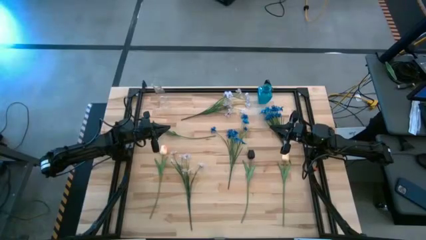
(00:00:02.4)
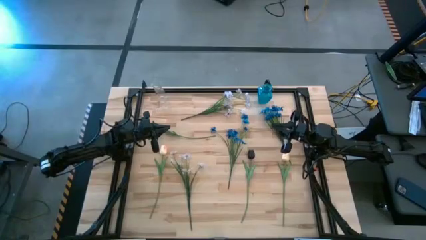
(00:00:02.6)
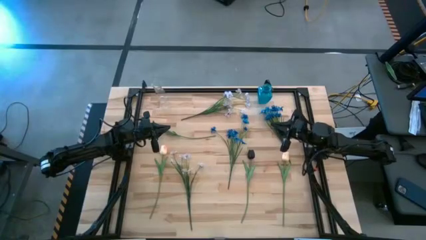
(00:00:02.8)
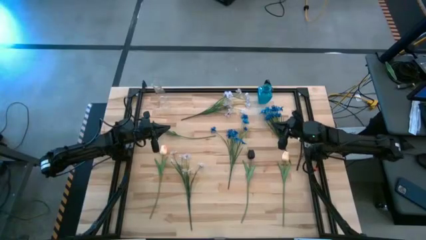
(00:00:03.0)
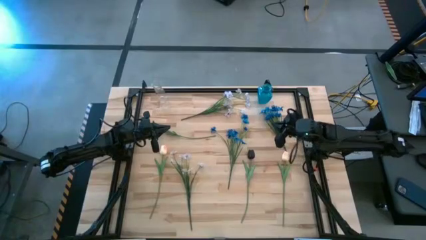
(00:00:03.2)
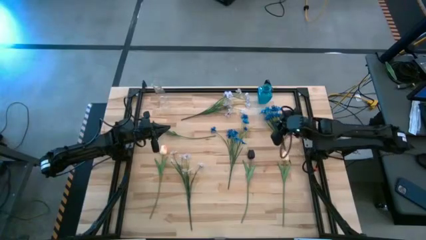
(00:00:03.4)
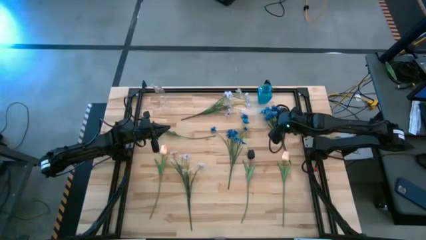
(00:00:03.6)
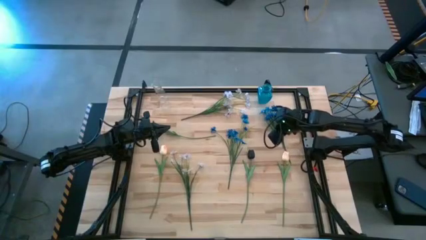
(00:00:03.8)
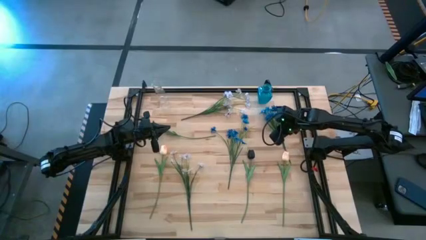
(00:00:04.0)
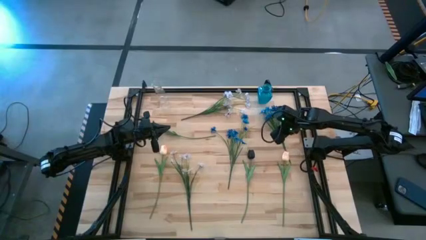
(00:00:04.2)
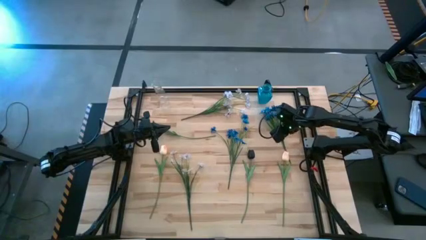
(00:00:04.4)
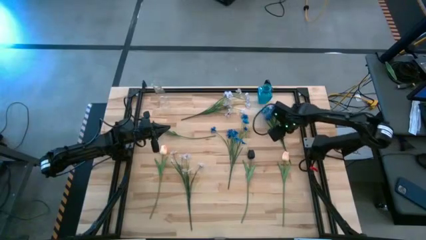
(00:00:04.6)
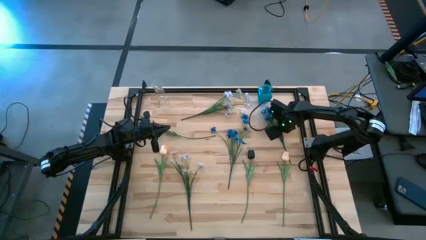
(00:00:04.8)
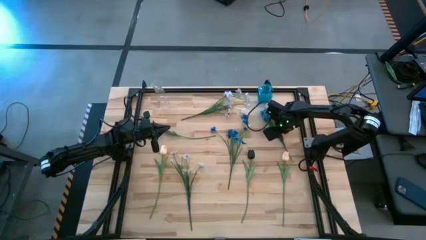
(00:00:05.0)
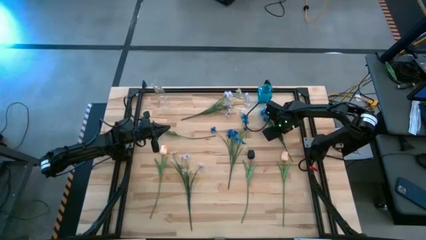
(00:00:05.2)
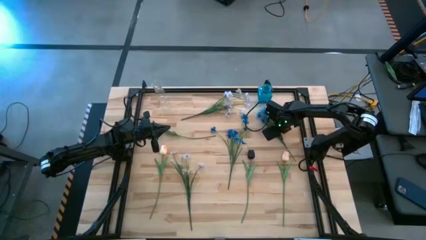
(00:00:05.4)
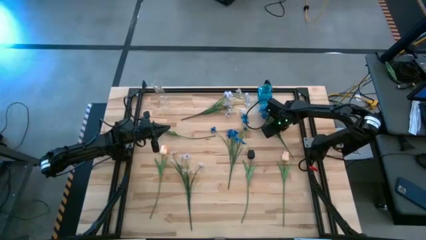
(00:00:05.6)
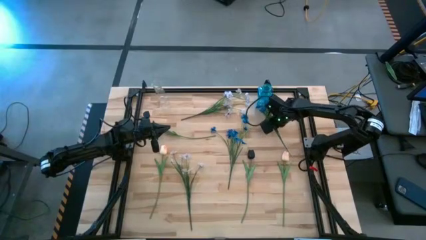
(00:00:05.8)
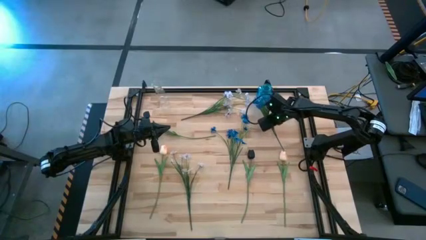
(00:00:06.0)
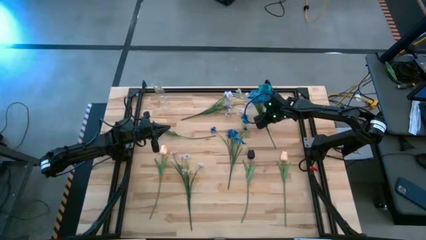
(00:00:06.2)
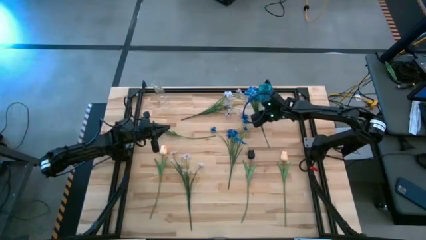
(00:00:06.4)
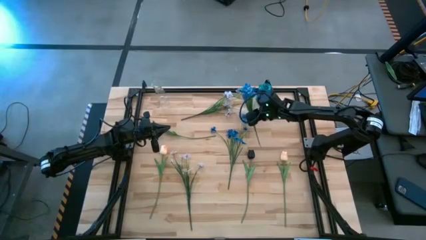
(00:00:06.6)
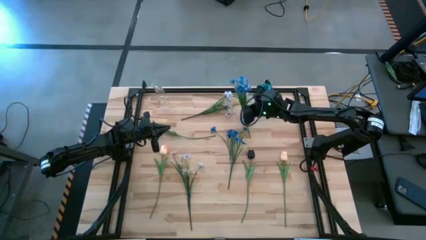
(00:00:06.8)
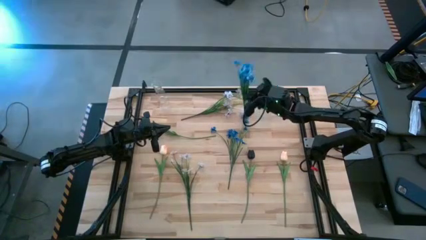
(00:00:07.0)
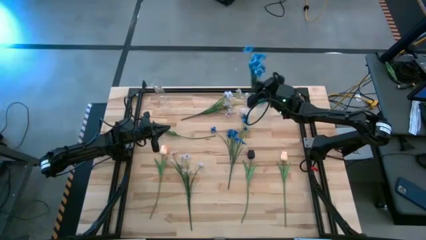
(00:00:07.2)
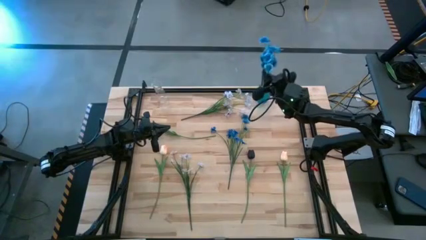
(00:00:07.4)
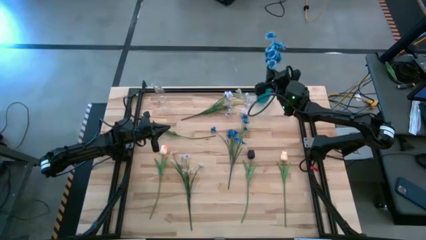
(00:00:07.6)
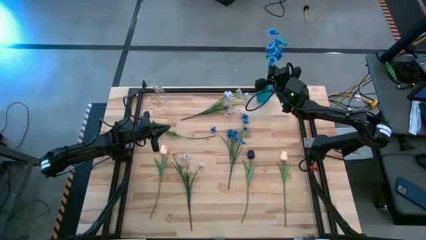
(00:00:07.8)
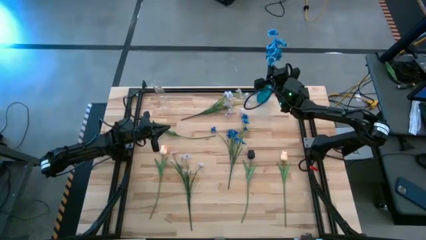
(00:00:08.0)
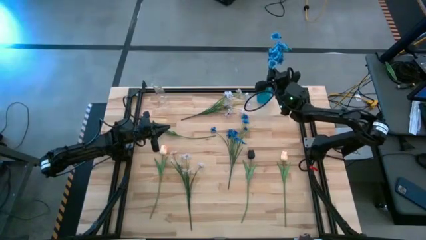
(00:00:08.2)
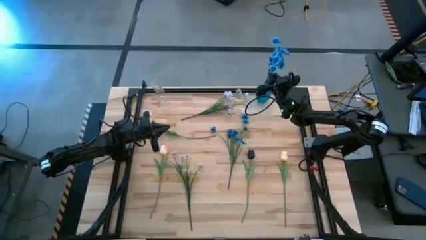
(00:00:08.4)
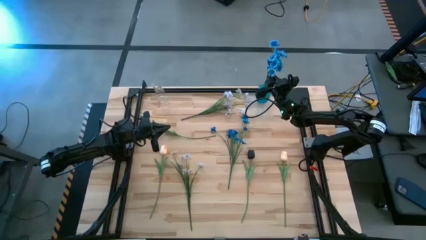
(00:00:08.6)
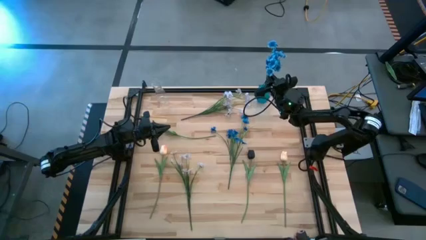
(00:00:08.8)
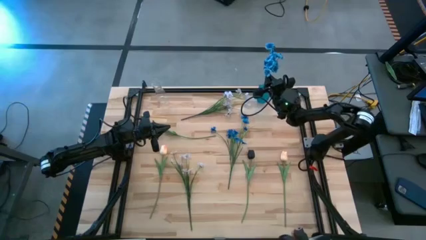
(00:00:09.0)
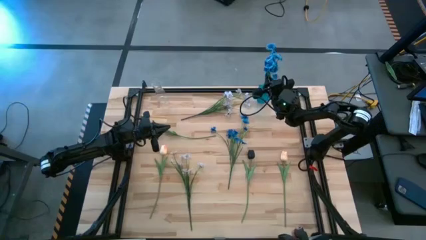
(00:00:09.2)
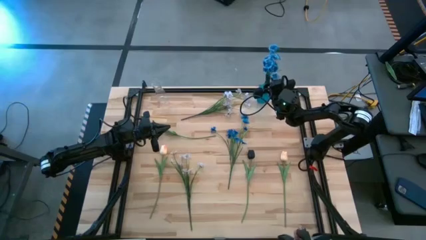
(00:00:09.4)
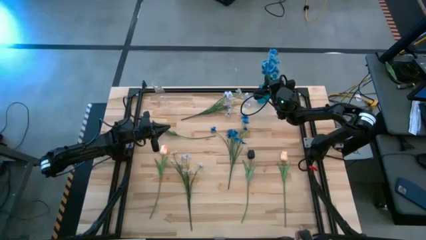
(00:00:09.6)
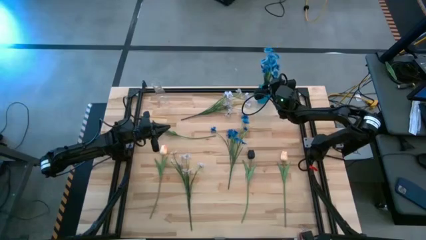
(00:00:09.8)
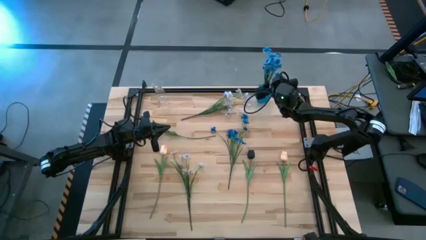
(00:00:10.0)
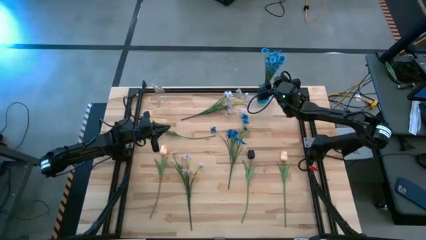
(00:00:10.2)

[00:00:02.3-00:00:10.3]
Task: Sort flowers into vase by color
Put the right blue flower into the blue vase

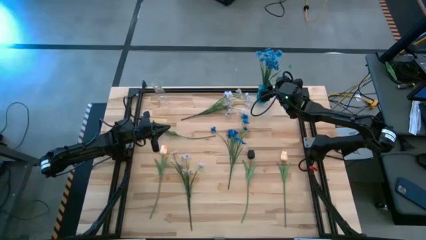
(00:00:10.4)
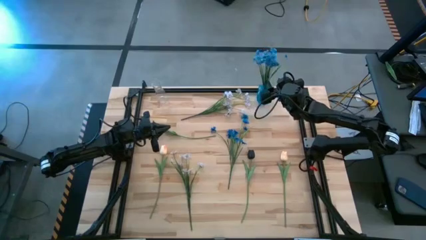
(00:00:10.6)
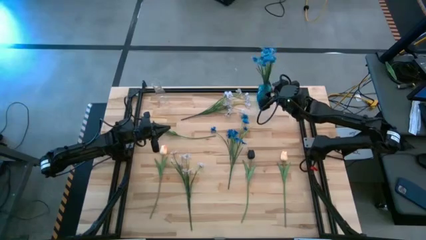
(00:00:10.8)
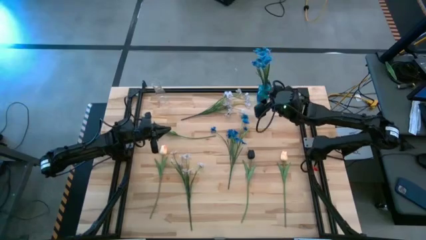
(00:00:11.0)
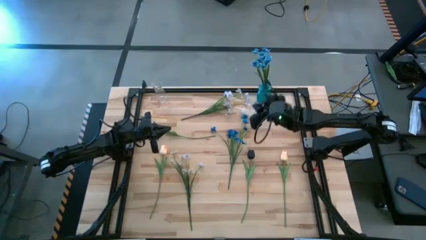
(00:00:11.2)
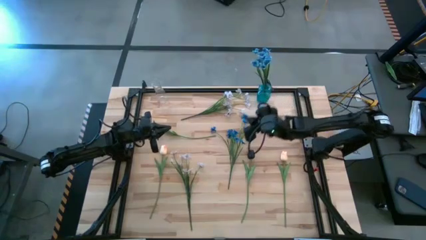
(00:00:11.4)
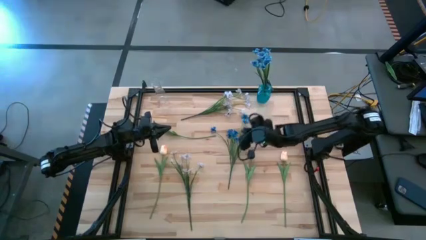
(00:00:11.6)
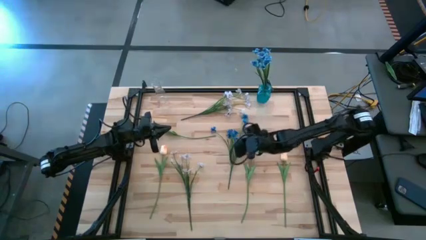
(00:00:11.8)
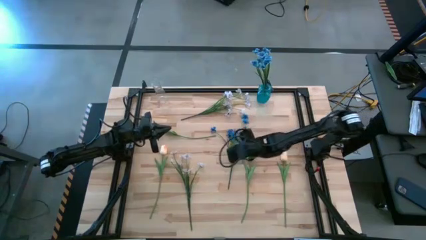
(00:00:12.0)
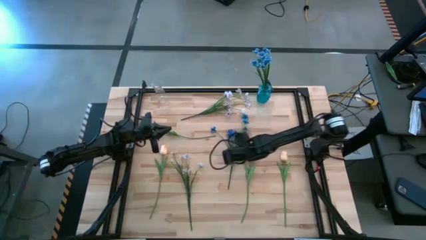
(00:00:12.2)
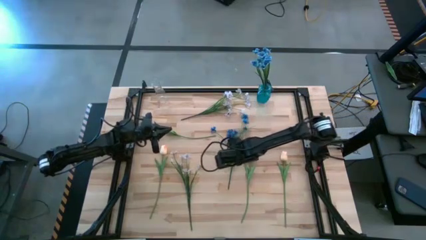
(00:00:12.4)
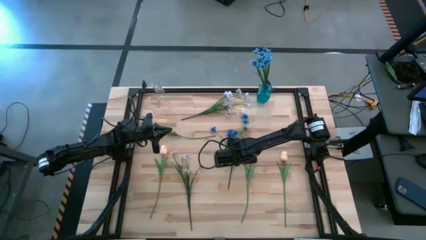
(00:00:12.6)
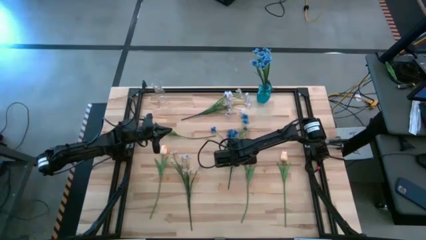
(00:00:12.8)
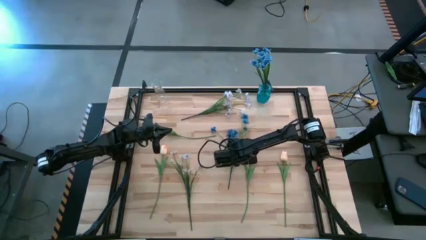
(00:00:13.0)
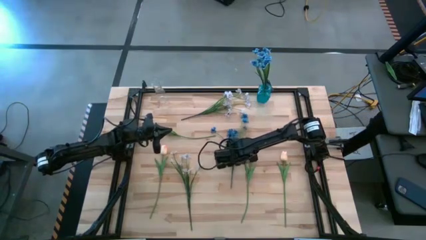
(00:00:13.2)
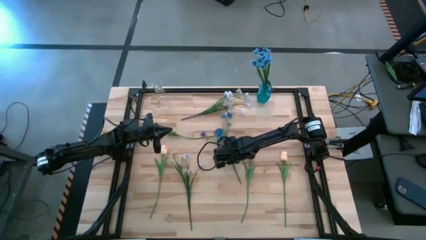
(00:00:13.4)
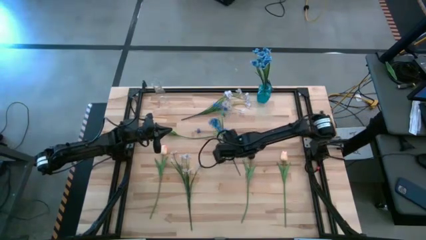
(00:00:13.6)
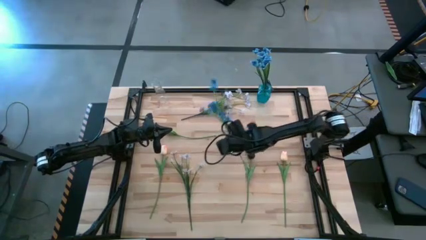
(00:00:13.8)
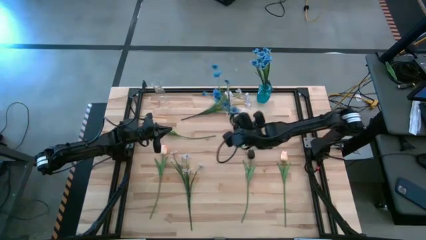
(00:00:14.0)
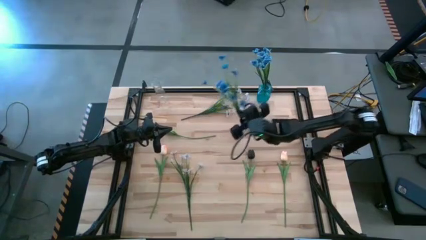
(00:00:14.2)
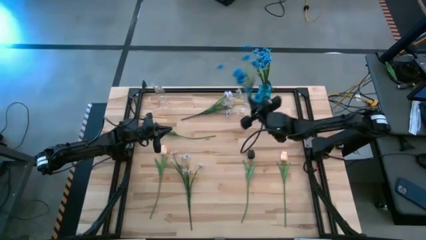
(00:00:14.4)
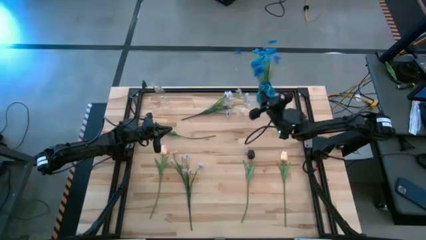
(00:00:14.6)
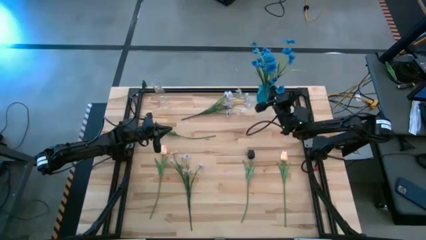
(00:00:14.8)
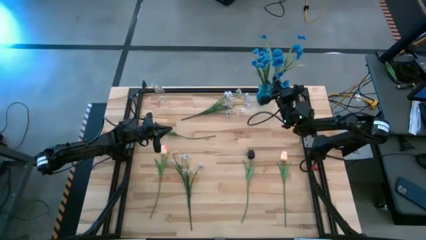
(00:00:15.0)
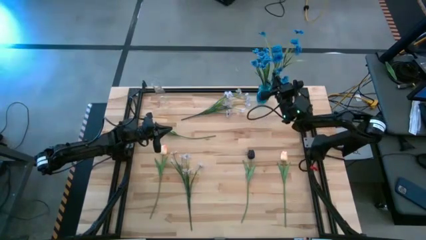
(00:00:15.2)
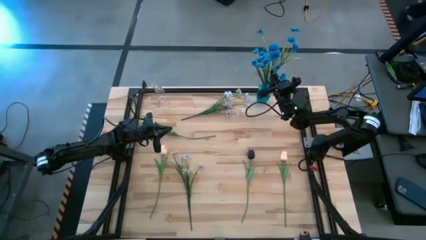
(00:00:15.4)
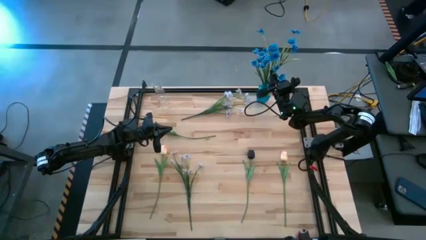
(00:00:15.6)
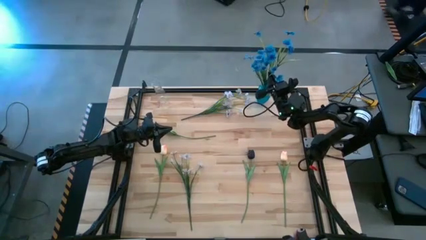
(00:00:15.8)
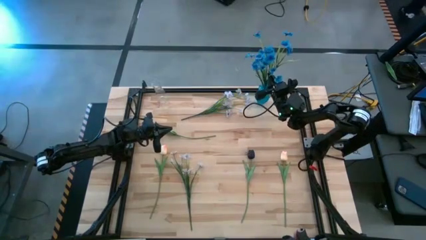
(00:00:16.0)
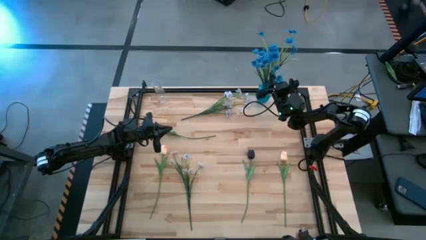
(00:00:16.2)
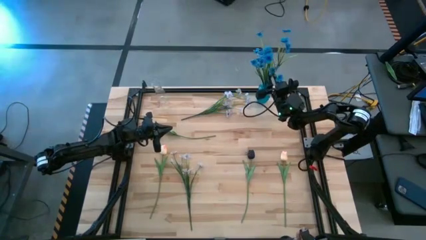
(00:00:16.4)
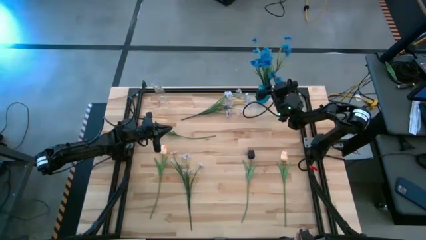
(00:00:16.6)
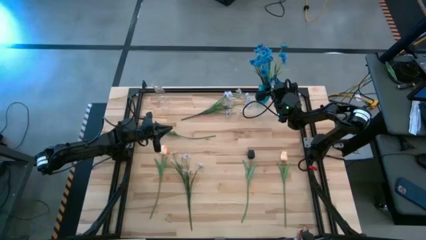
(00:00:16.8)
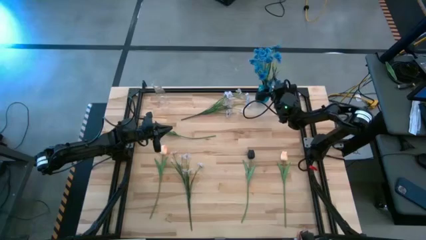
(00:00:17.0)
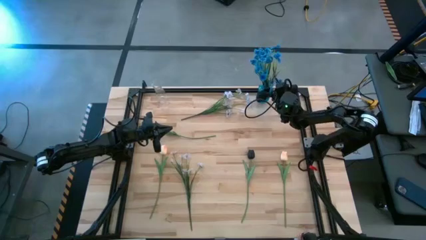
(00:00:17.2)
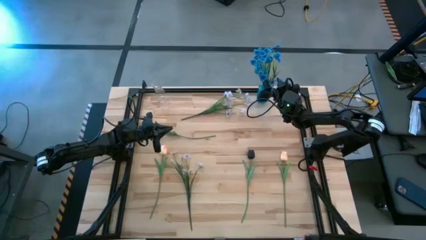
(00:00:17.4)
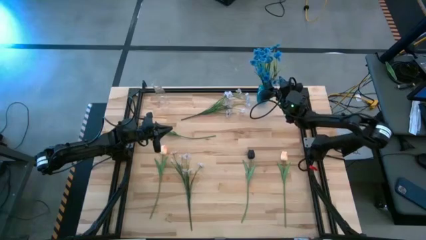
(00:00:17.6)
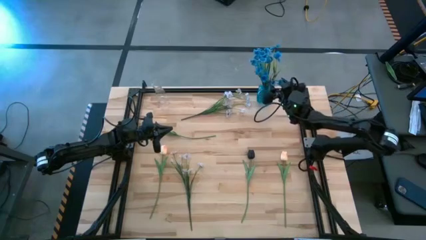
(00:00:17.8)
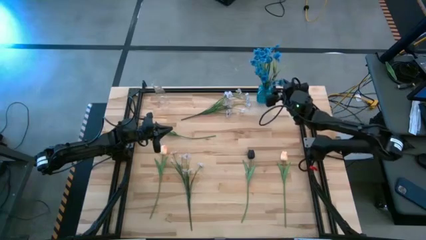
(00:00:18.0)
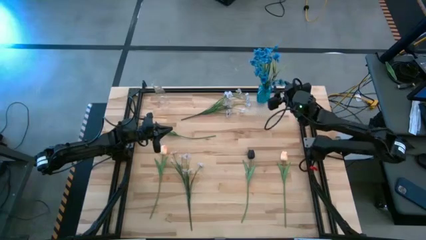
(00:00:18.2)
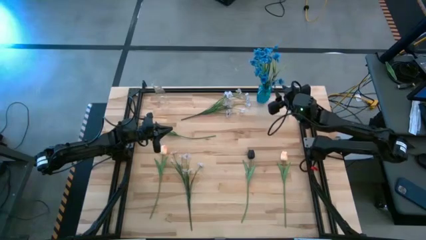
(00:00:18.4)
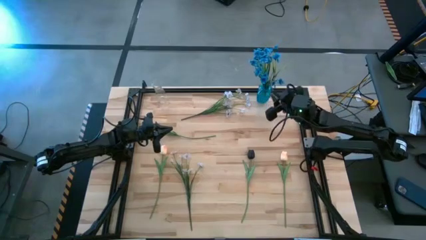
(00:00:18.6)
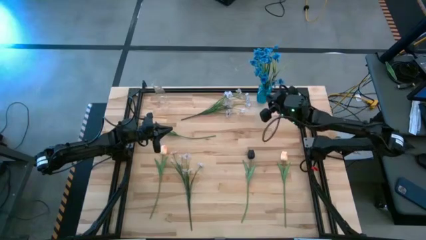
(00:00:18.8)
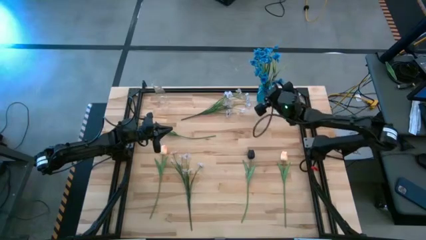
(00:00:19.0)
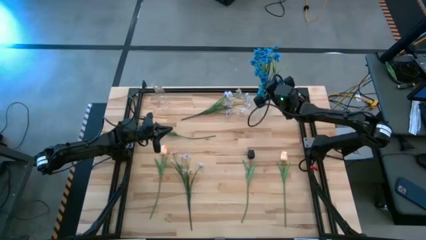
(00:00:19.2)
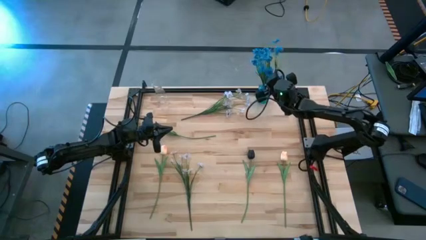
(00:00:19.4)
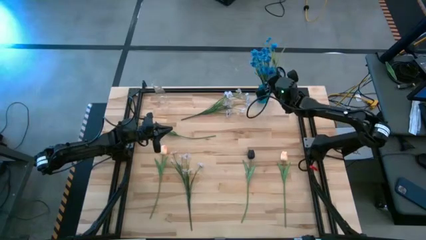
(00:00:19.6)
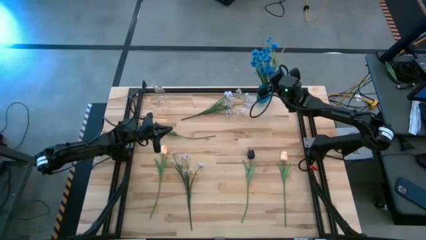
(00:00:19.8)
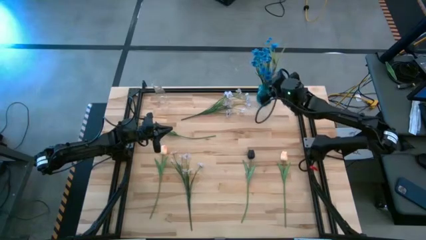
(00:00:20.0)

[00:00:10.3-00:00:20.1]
Put the blue flower into the blue vase
